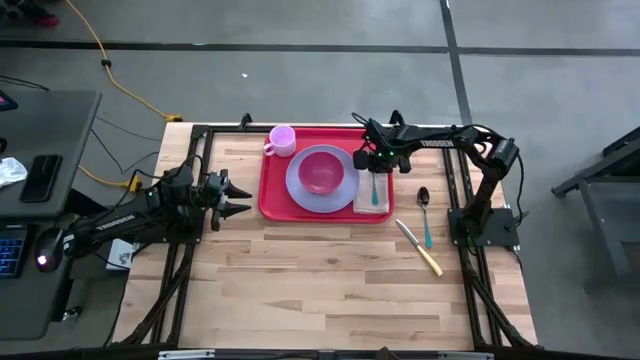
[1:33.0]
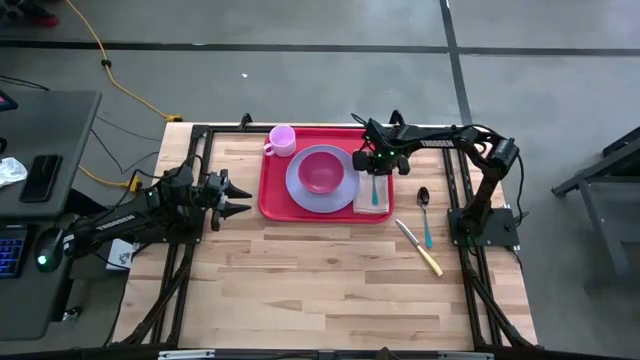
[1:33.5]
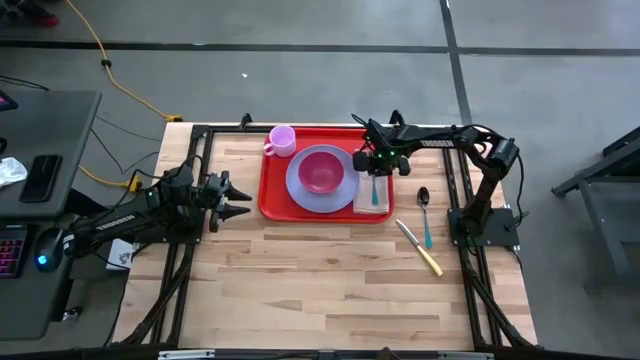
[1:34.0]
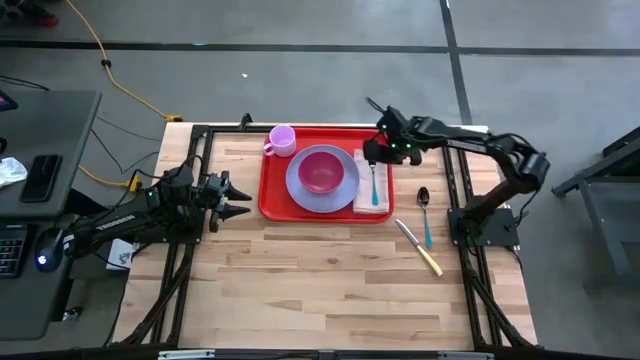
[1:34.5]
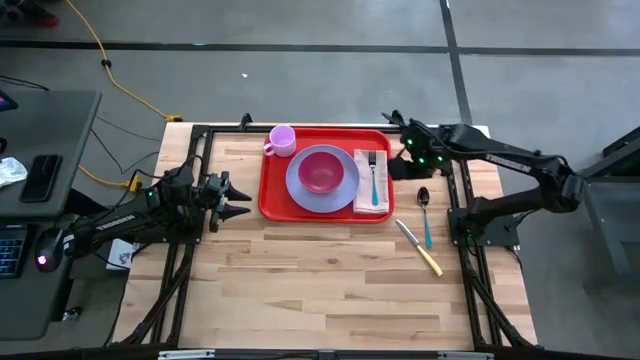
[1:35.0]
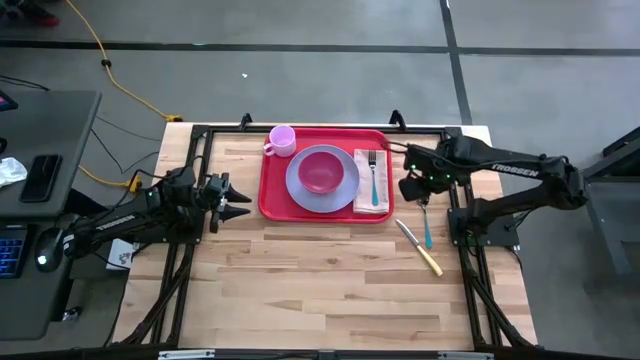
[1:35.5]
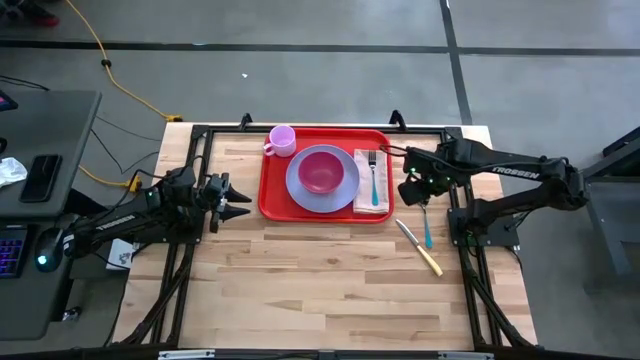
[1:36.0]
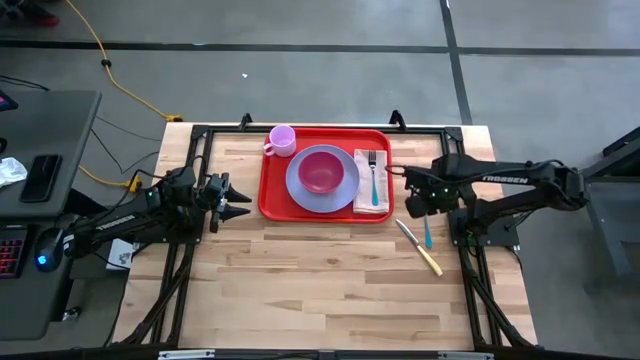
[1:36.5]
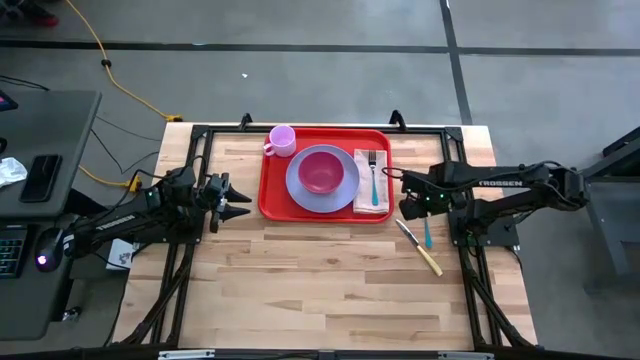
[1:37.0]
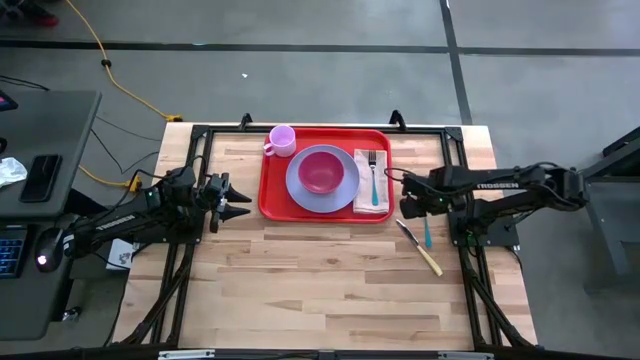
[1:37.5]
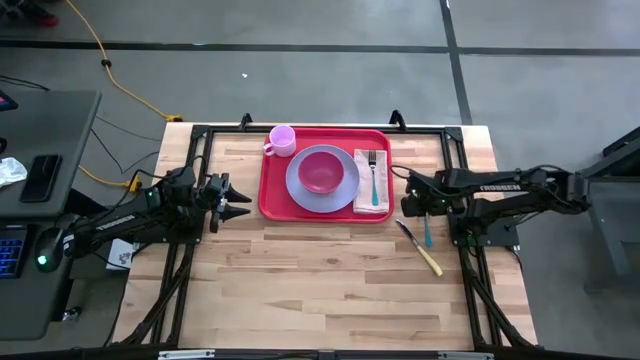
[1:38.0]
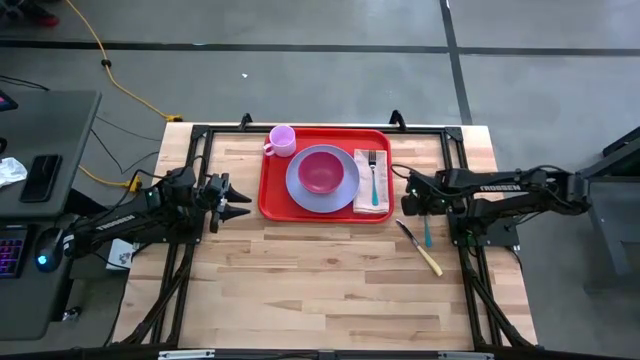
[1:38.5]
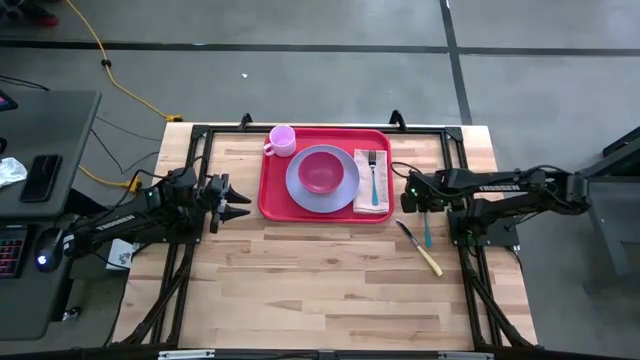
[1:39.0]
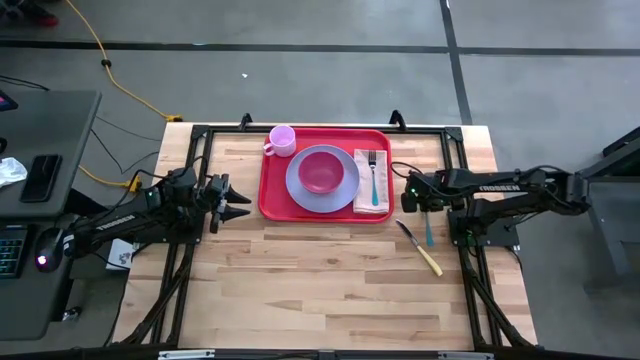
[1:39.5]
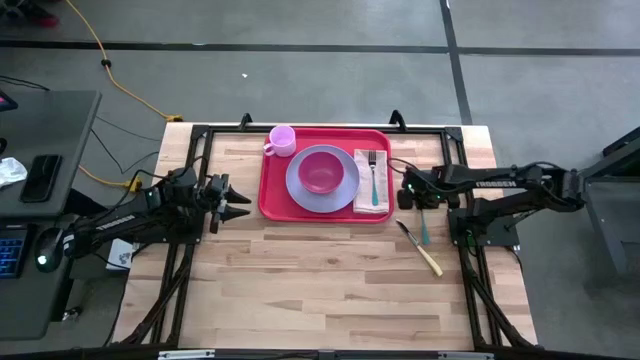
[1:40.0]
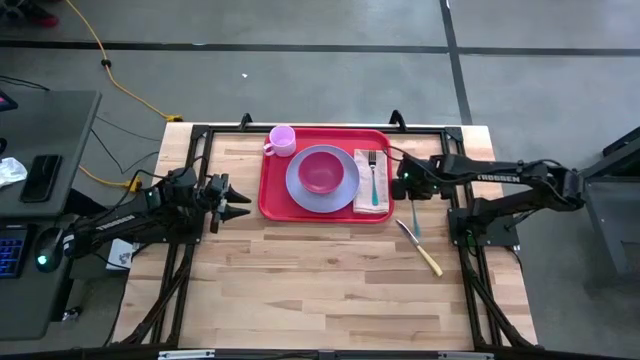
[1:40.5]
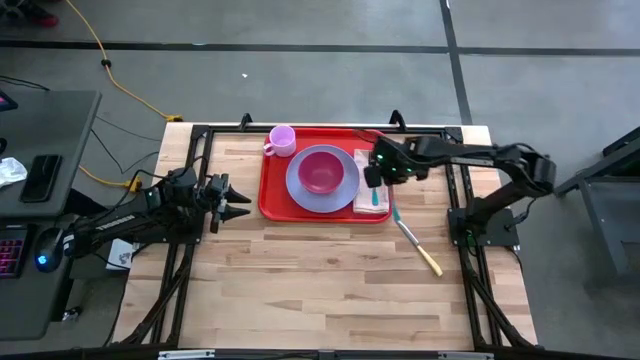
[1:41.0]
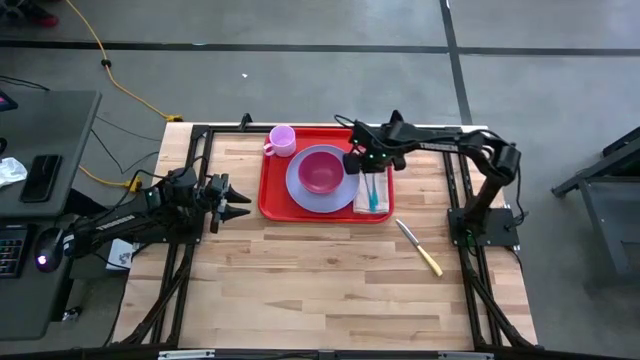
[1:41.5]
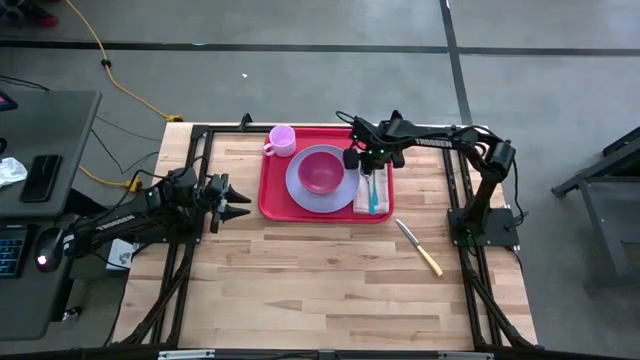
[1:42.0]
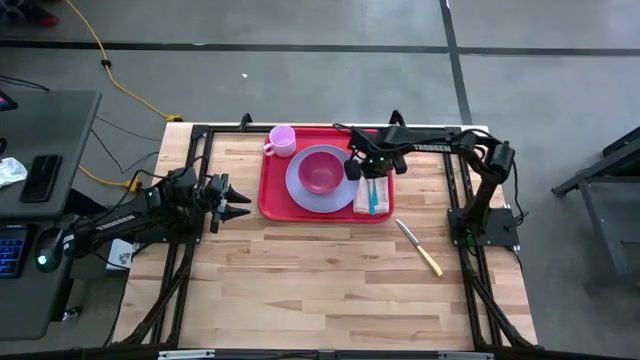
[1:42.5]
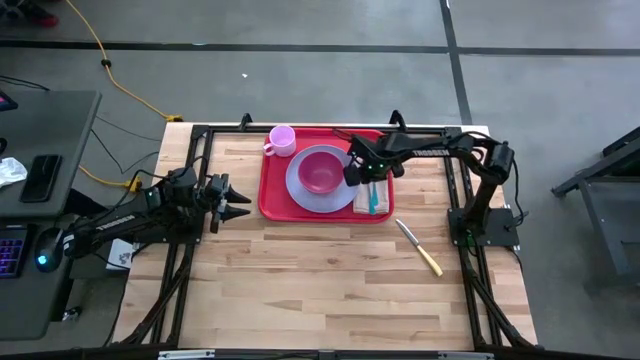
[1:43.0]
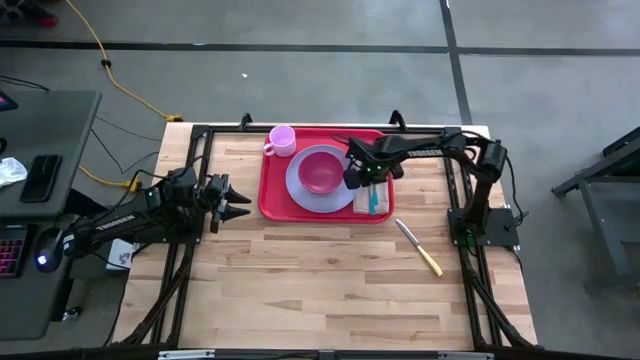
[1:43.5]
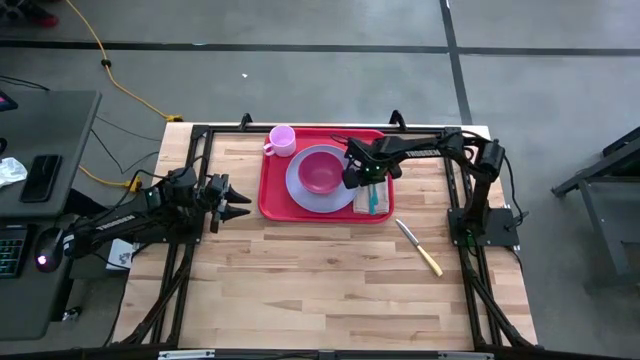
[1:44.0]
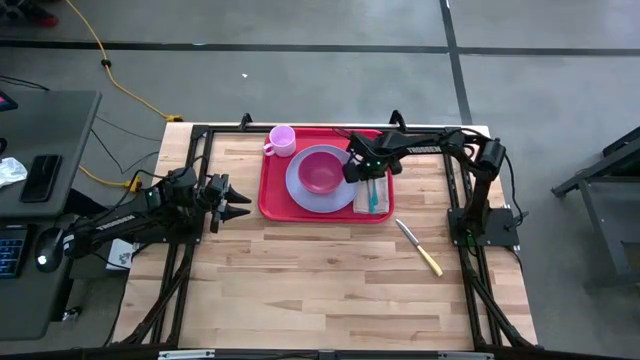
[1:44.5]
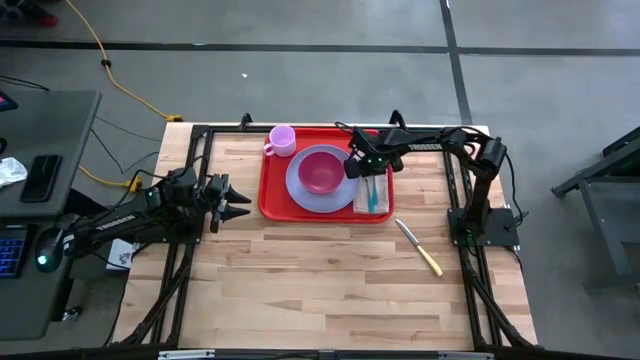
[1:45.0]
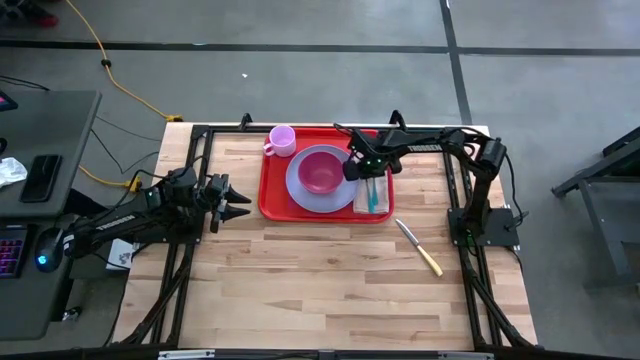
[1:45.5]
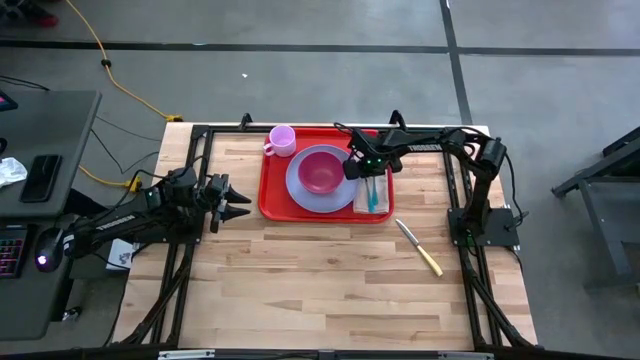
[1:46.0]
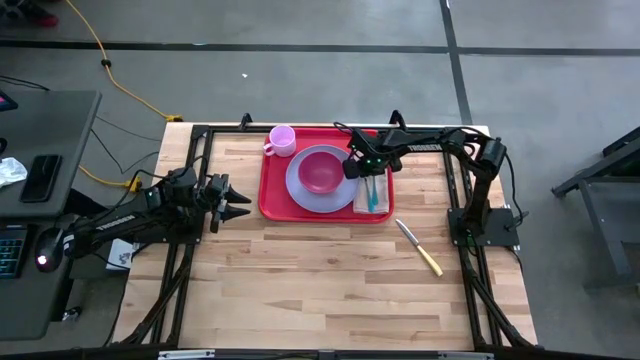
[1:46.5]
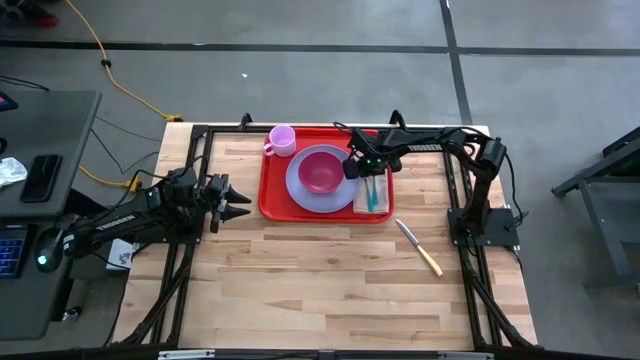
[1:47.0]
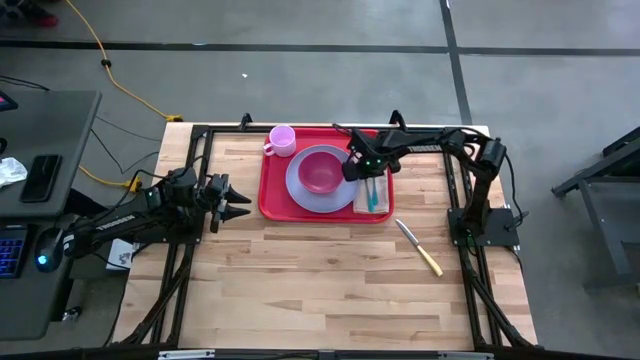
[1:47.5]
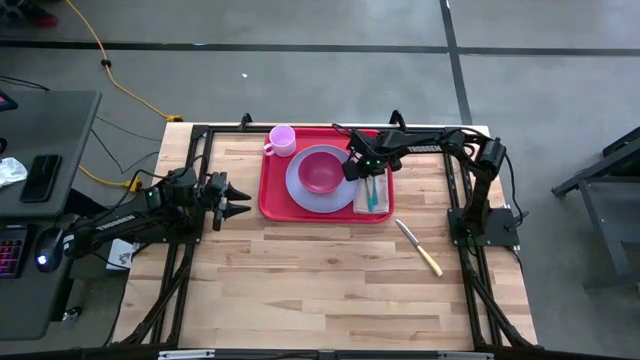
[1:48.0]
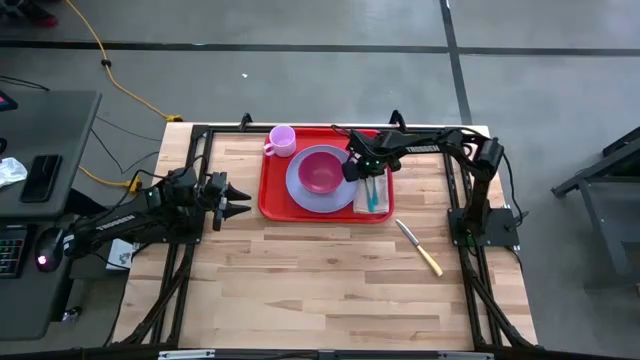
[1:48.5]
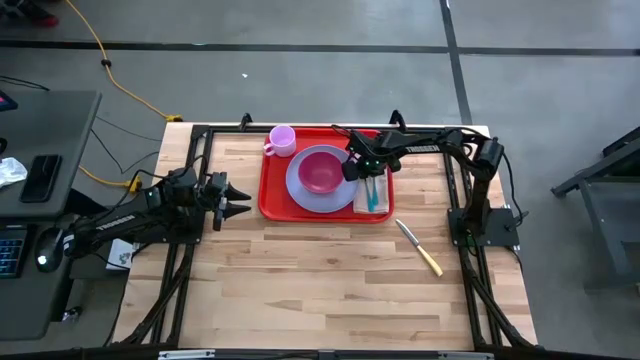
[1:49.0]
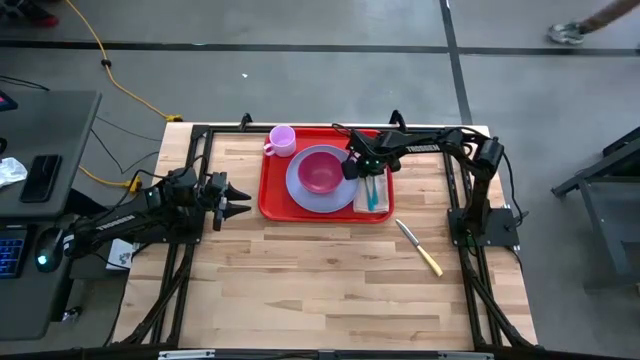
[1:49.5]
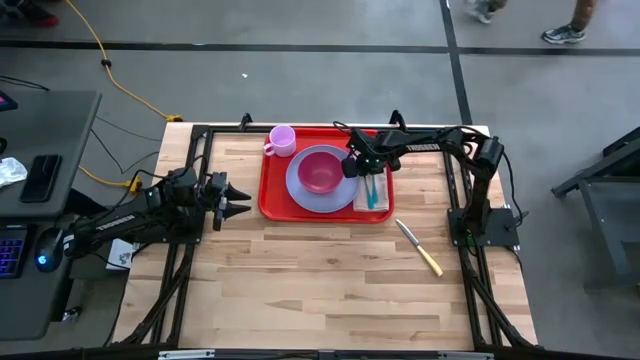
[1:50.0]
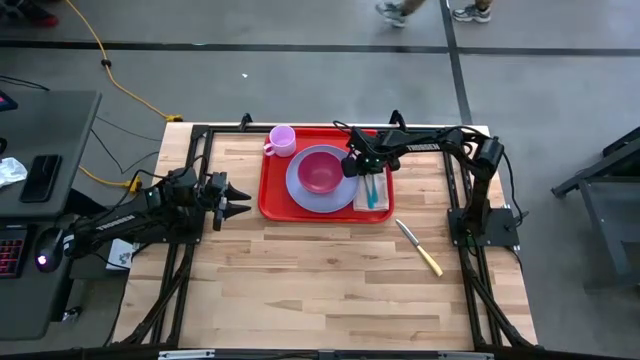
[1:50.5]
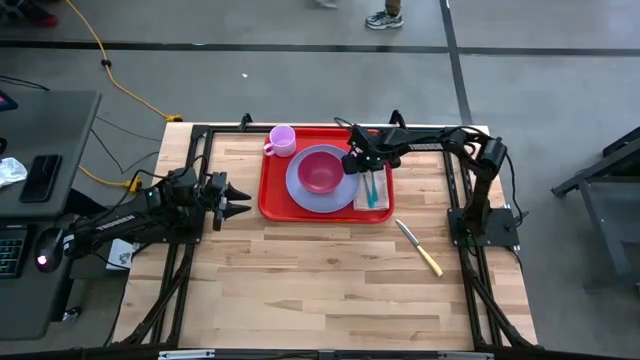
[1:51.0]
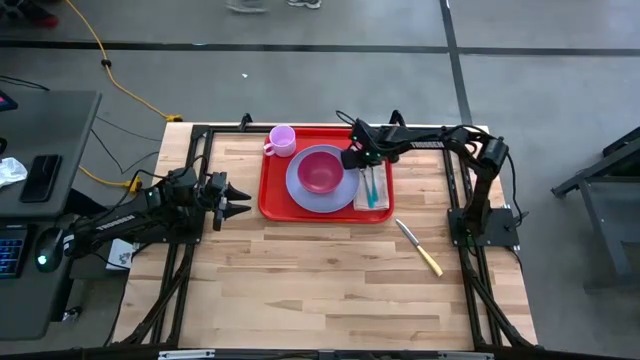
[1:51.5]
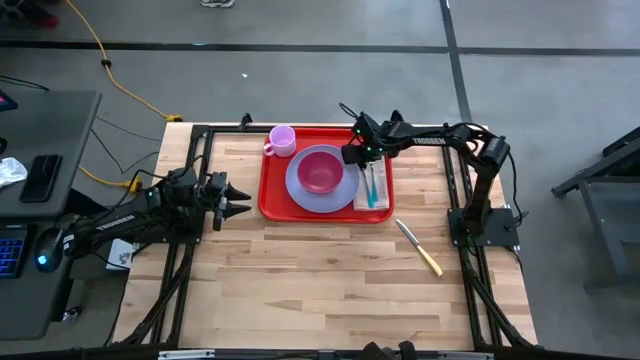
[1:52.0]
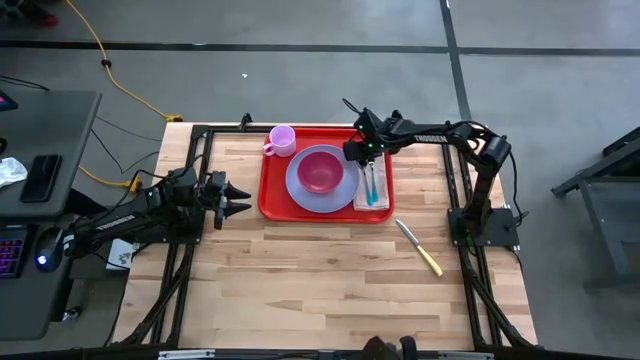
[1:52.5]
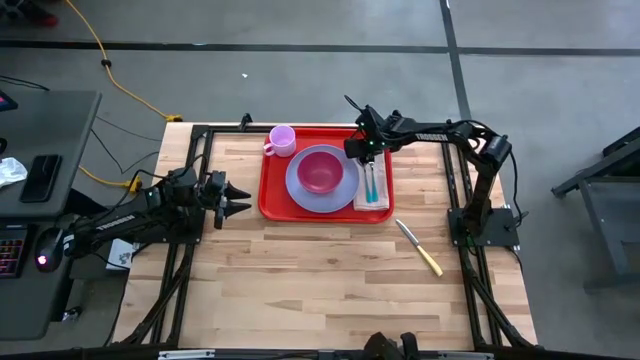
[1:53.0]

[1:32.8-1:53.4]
Task: Set up tray
Put the spoon on the napkin on the tray
